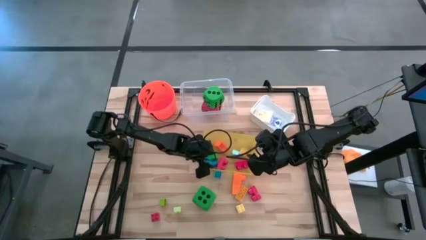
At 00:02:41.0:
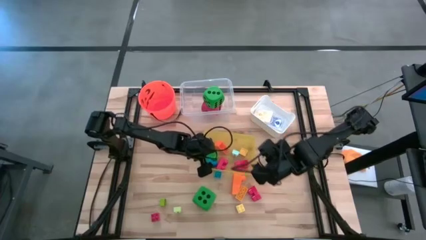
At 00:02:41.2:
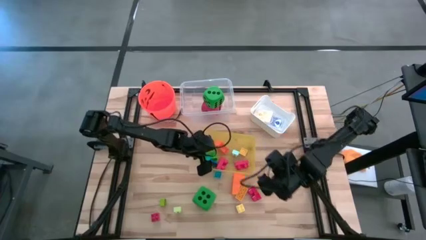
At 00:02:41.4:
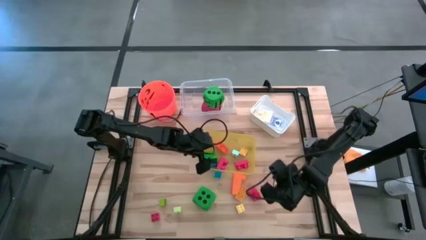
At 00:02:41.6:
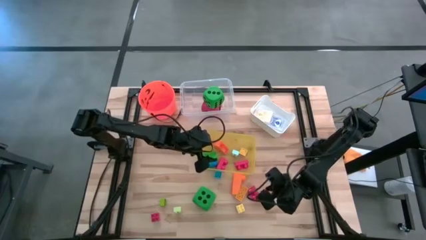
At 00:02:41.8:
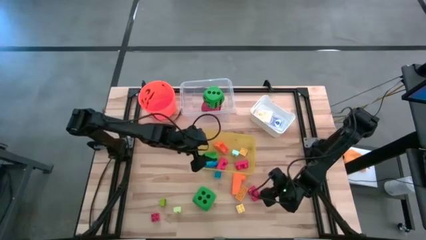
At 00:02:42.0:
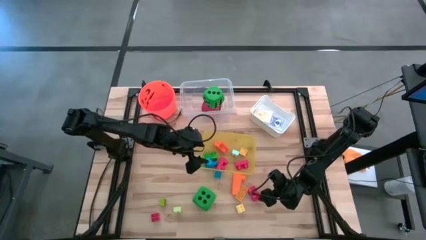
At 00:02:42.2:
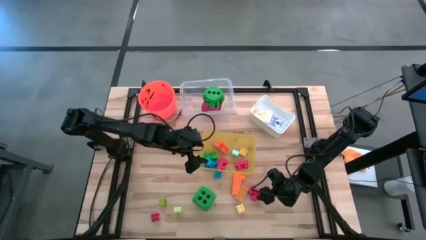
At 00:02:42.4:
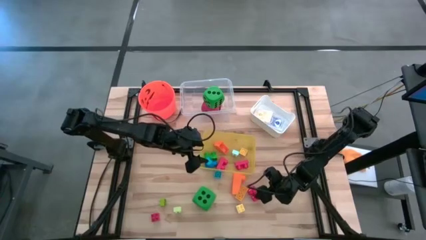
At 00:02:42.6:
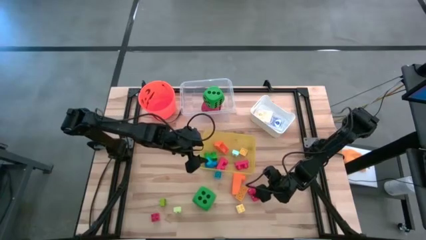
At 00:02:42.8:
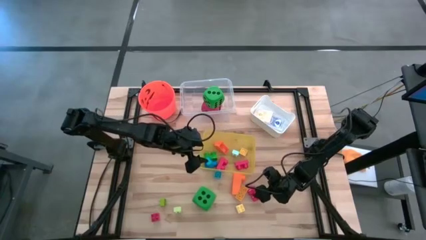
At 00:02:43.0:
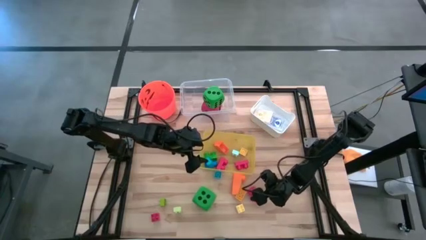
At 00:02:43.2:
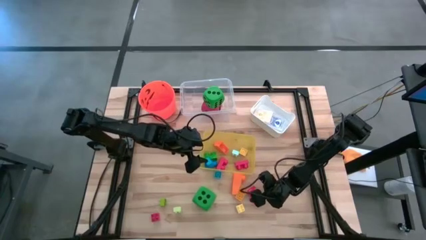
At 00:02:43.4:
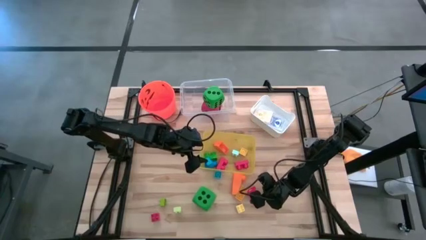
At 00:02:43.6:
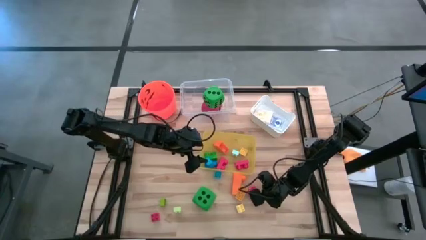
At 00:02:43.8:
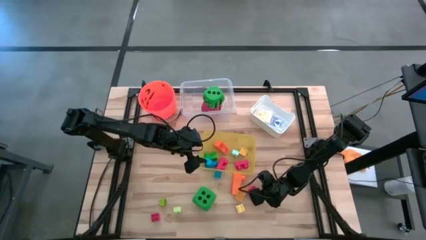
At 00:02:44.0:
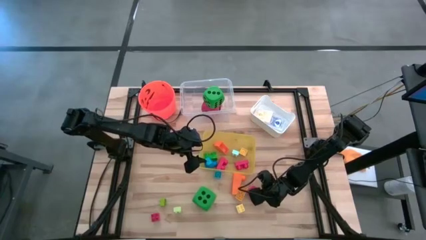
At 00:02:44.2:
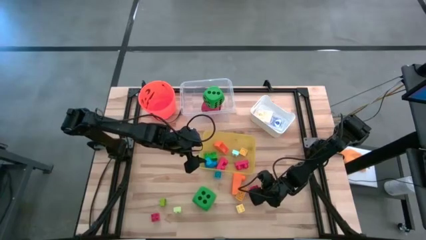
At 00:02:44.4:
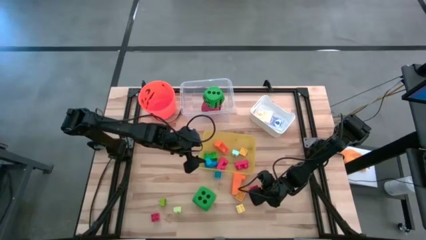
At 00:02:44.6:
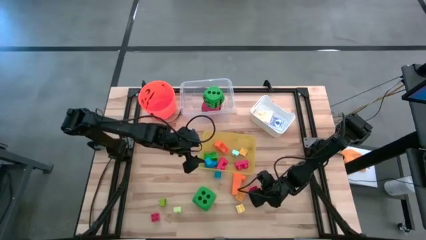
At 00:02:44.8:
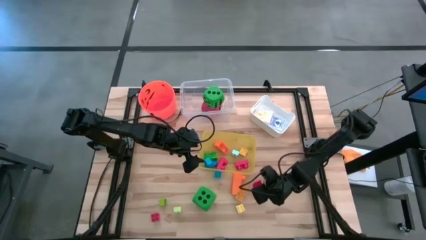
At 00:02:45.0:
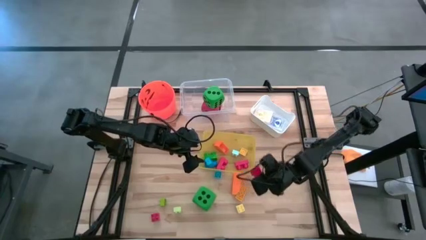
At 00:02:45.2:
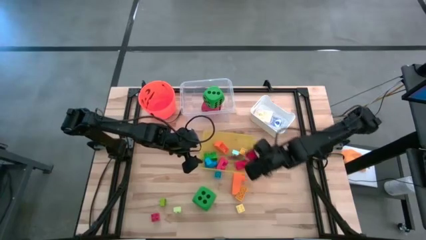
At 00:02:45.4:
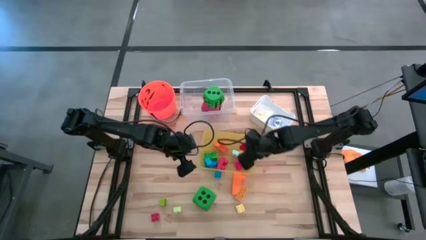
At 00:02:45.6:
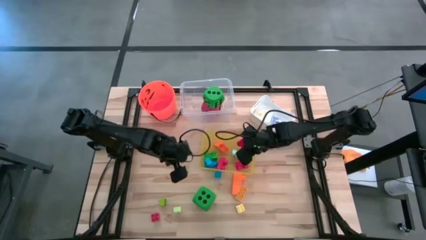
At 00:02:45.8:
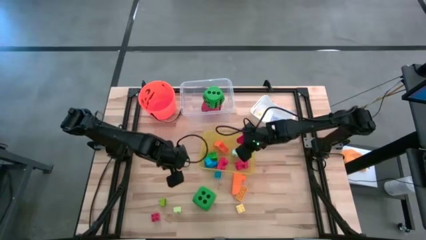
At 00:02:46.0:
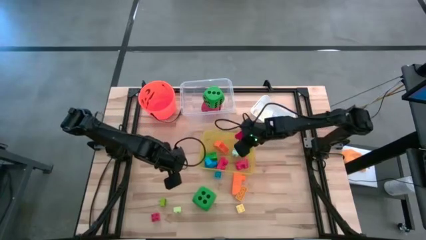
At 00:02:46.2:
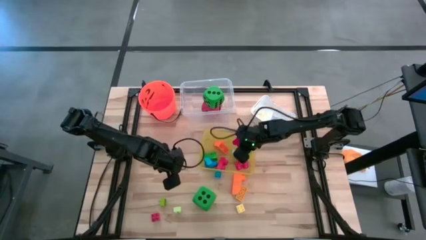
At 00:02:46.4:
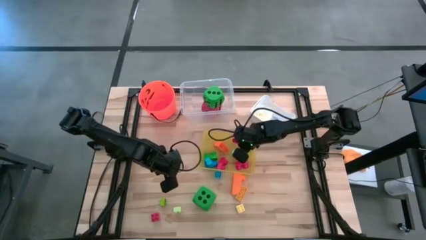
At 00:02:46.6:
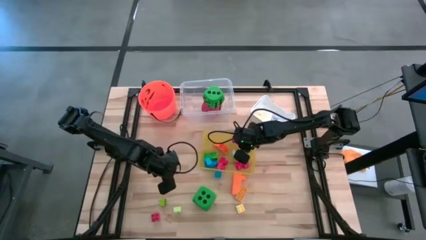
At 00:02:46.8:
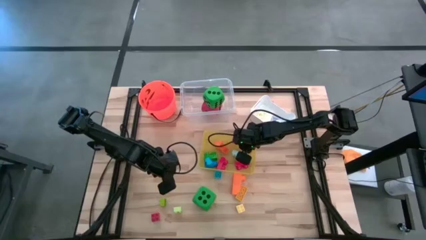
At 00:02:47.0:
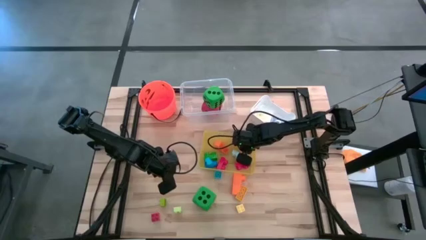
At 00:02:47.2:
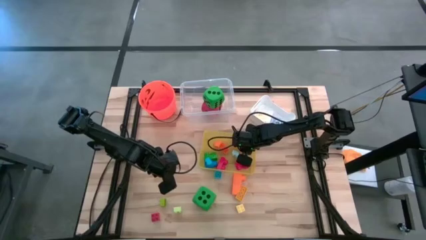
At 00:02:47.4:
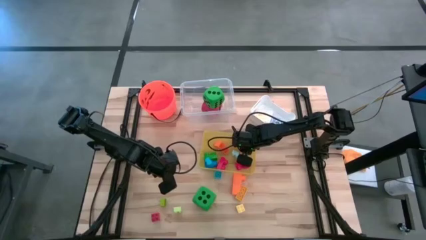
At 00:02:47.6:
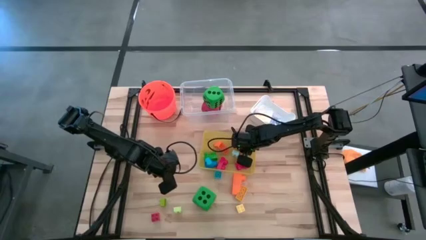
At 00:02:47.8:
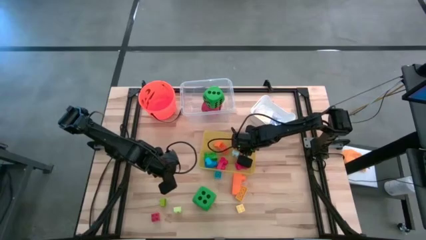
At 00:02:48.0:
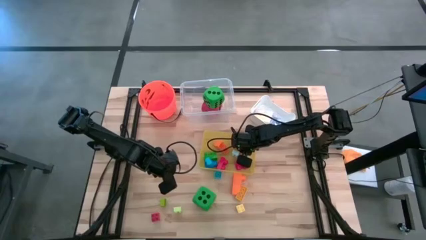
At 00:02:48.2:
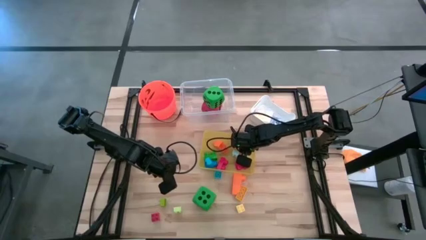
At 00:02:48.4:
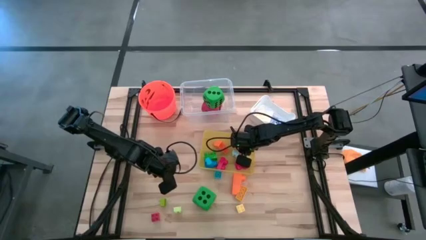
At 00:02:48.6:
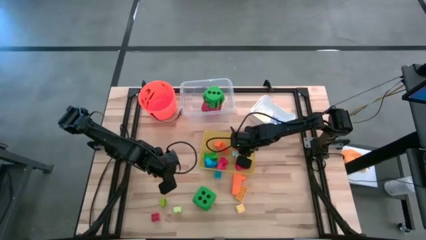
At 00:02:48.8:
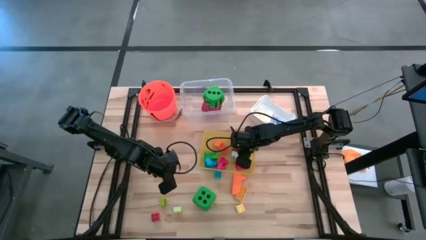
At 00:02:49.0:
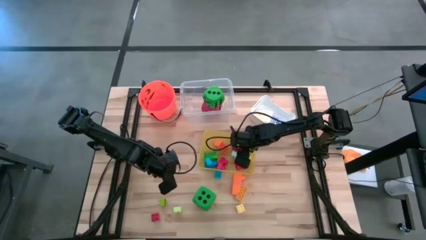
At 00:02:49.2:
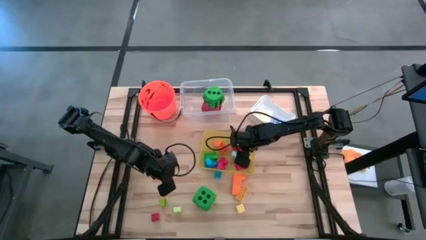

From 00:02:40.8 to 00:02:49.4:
Task: Pick & Place Toys
Put the red game piece into the yellow bin

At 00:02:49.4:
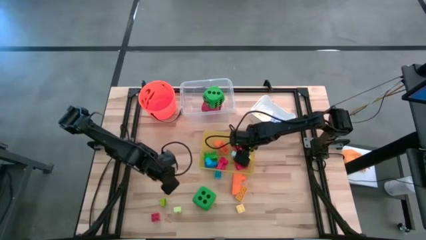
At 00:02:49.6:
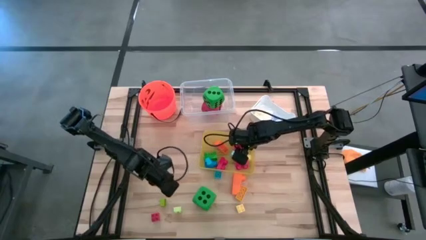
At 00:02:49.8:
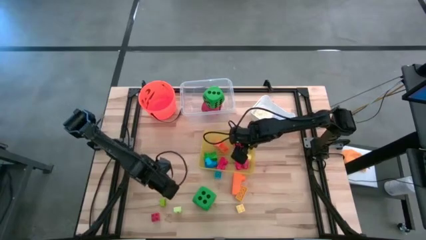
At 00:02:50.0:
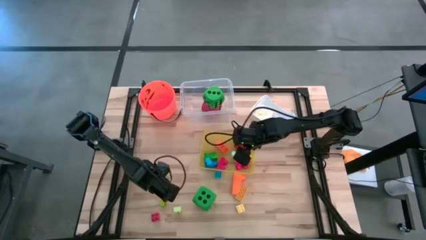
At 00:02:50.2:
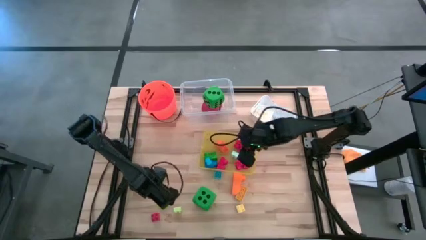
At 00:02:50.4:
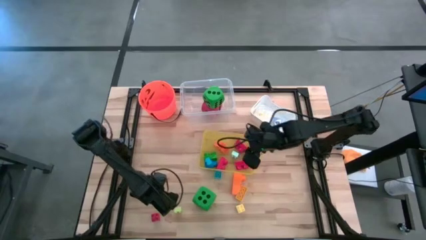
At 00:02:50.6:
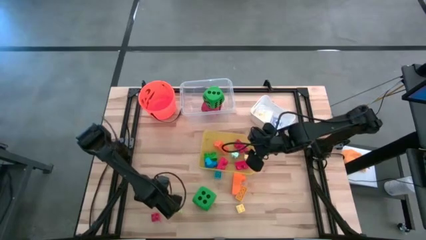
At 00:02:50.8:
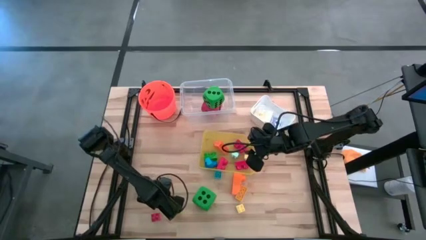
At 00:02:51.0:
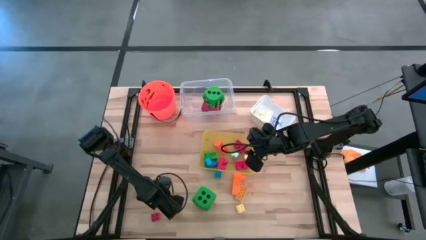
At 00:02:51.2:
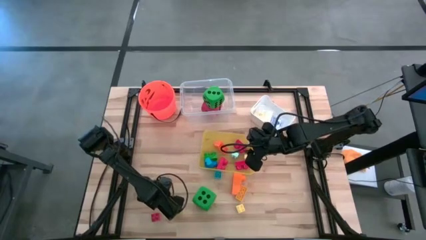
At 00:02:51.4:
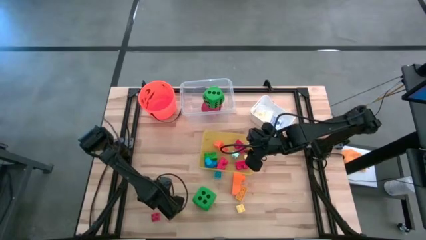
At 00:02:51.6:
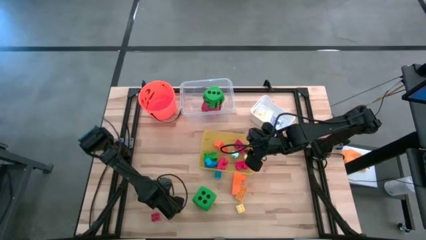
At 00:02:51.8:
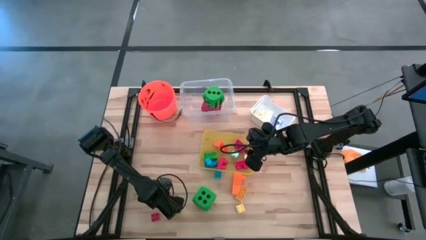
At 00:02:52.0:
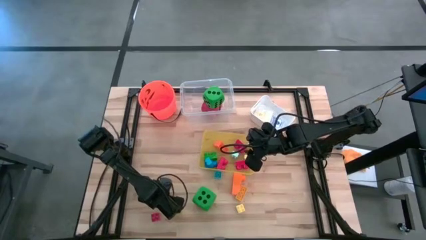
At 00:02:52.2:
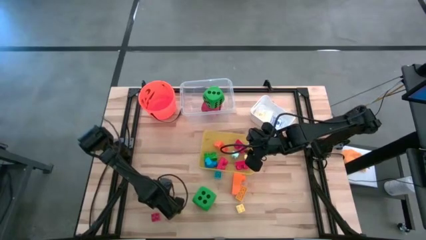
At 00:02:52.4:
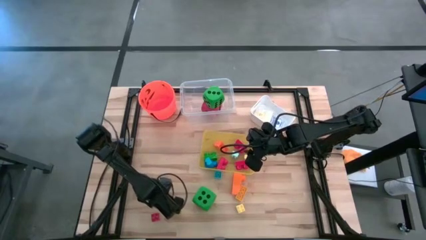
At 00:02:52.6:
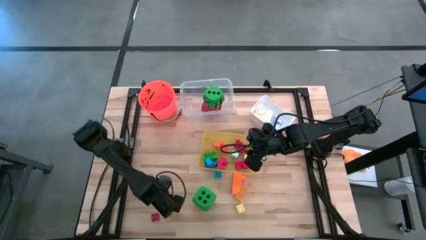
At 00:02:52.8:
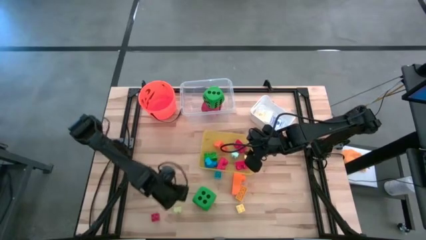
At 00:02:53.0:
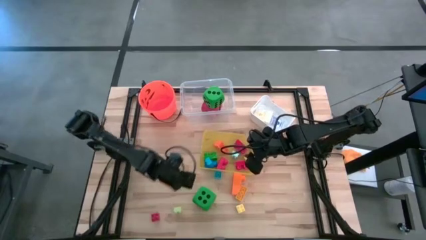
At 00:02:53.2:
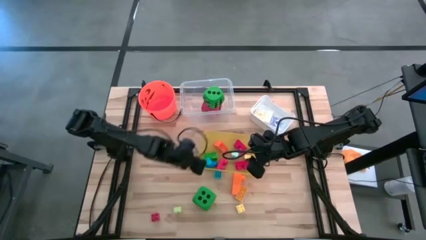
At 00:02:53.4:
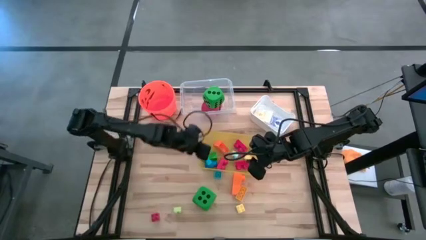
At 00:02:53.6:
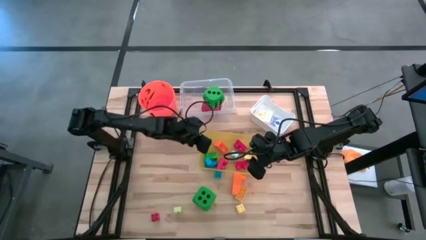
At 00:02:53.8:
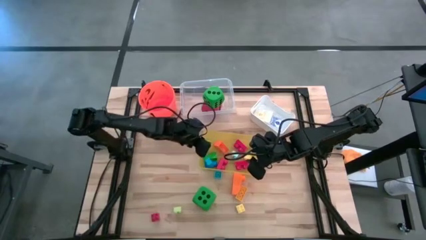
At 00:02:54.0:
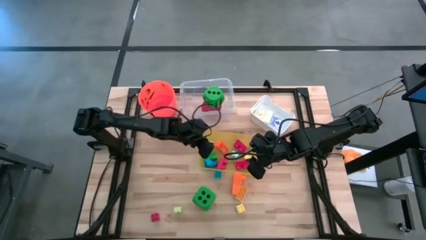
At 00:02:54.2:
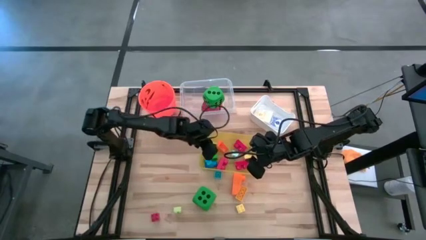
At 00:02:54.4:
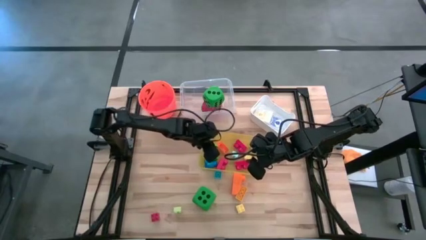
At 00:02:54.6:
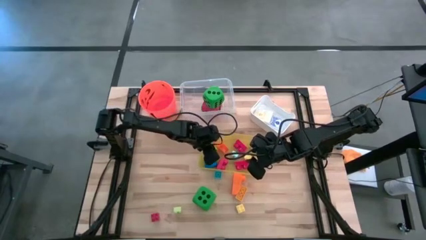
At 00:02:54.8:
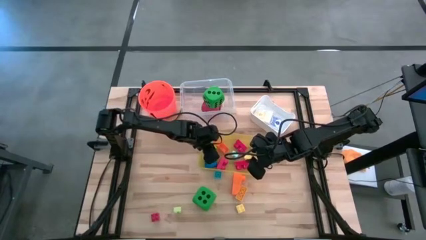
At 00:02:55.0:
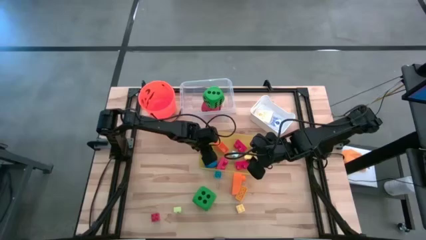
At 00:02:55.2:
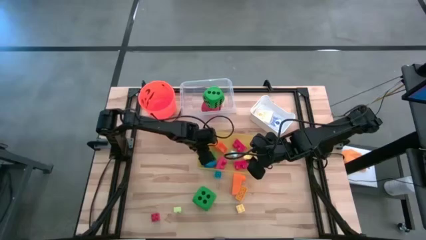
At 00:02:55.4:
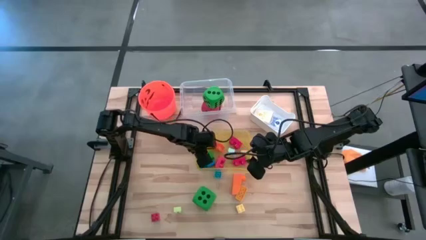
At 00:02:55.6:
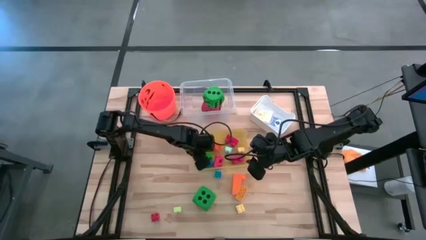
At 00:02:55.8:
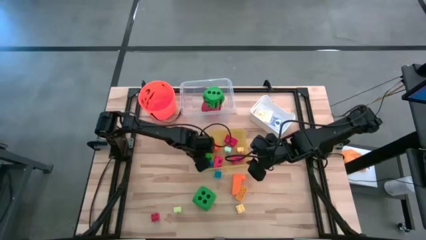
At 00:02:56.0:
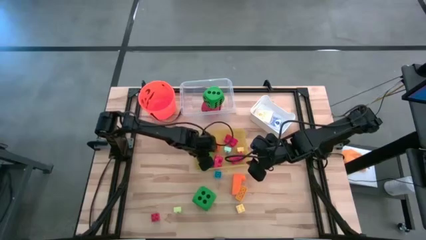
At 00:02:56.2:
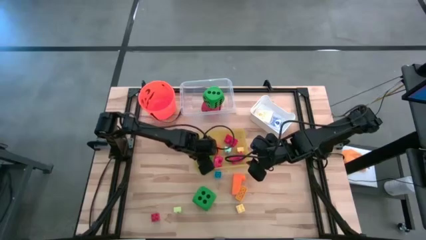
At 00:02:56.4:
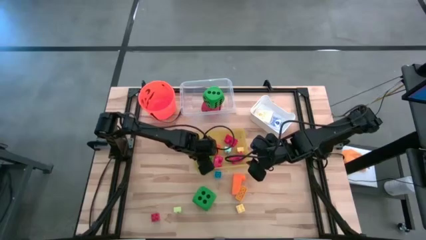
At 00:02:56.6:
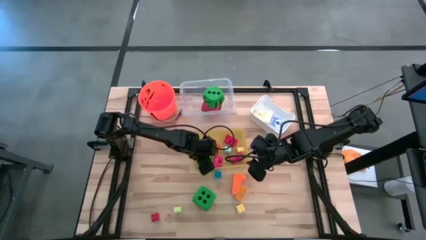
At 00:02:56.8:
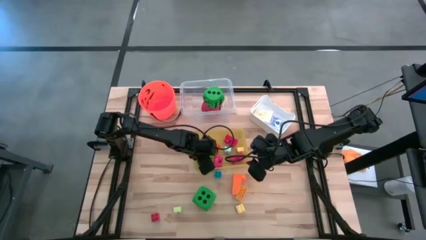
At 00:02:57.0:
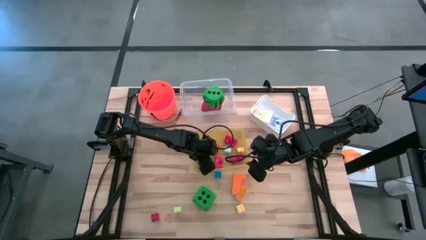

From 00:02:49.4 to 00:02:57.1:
Put the light green game piece into the yellow bin
